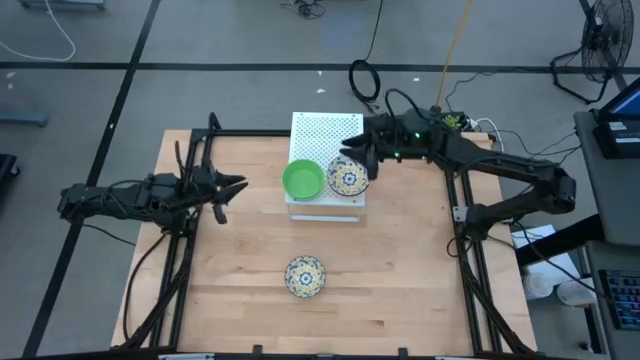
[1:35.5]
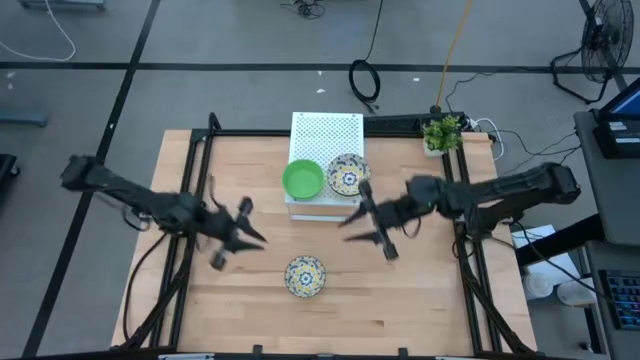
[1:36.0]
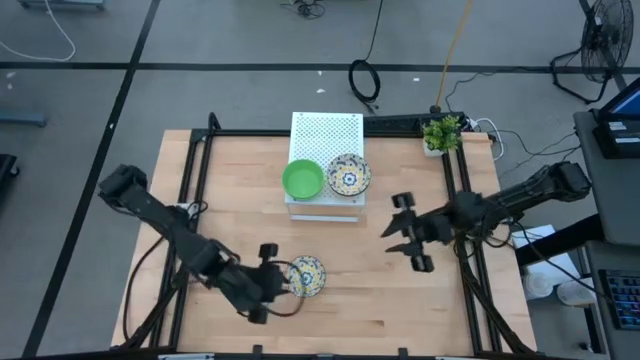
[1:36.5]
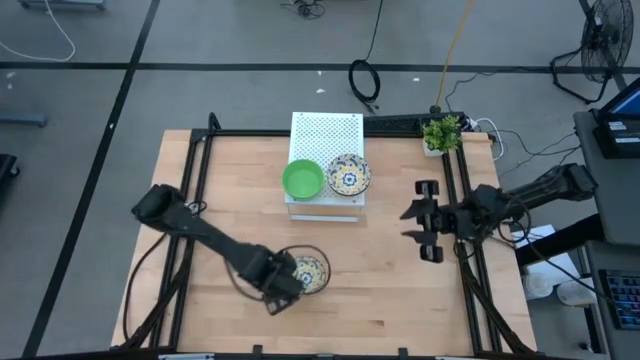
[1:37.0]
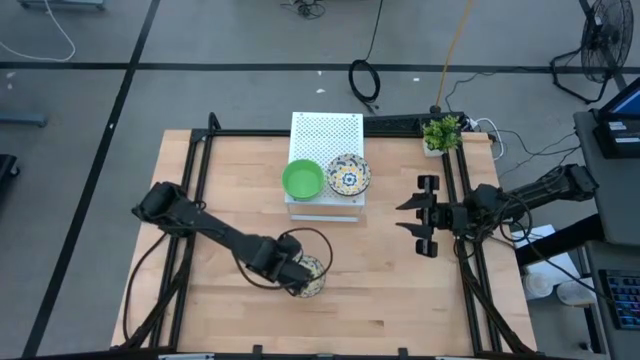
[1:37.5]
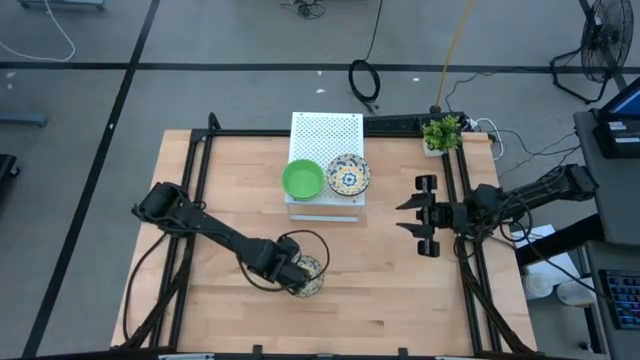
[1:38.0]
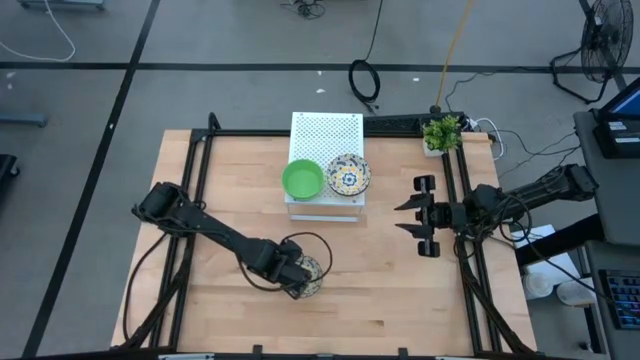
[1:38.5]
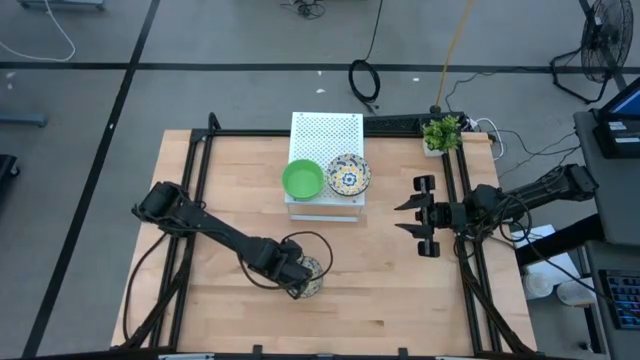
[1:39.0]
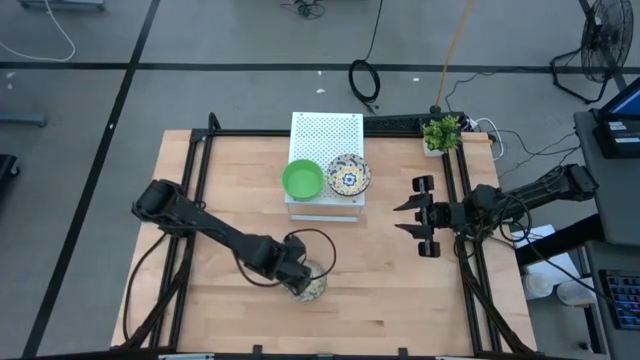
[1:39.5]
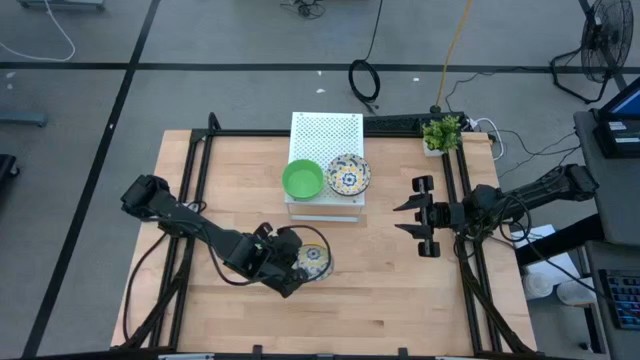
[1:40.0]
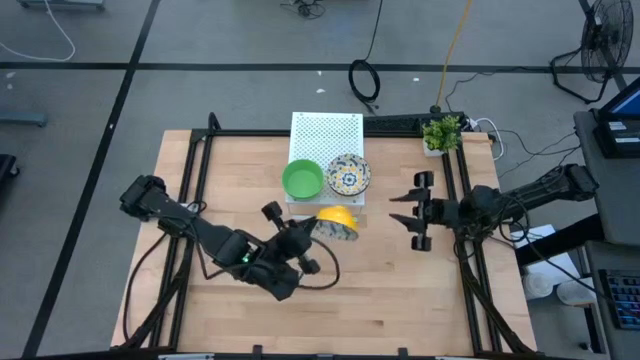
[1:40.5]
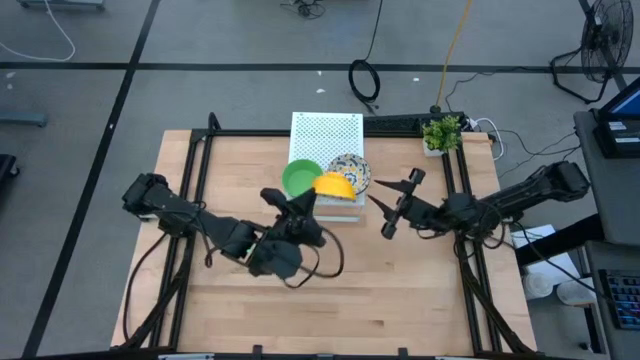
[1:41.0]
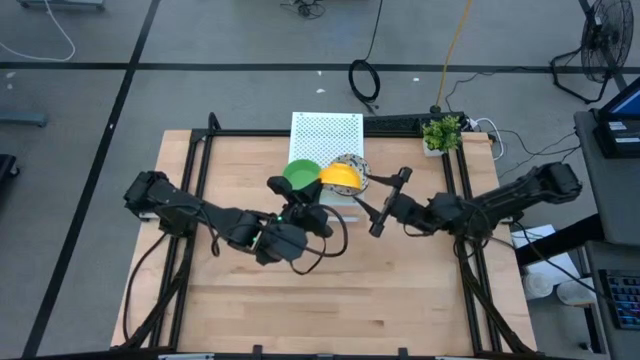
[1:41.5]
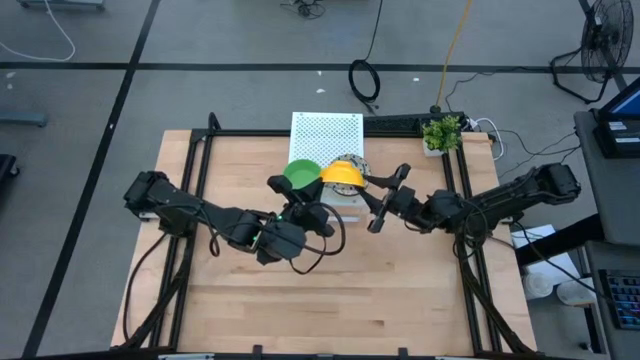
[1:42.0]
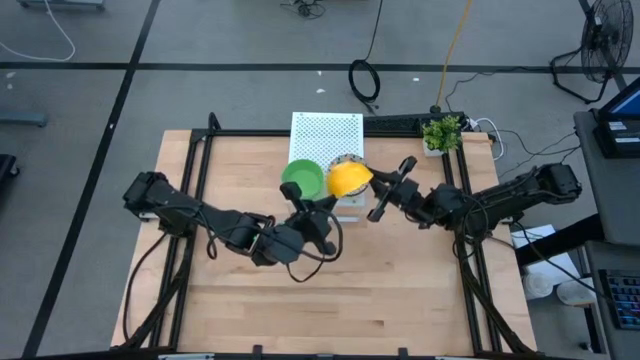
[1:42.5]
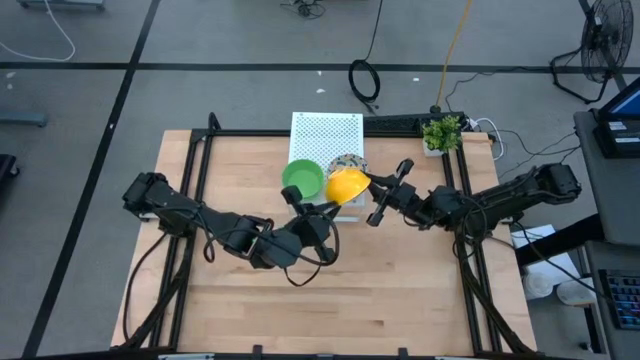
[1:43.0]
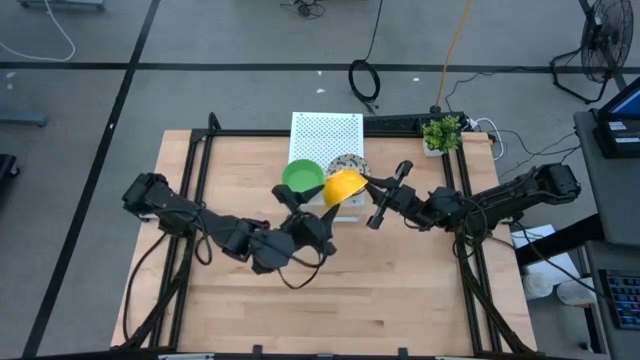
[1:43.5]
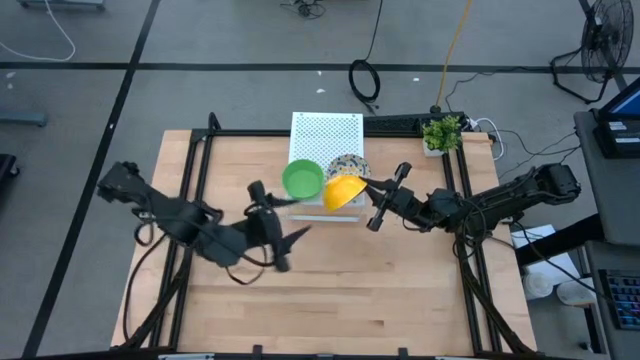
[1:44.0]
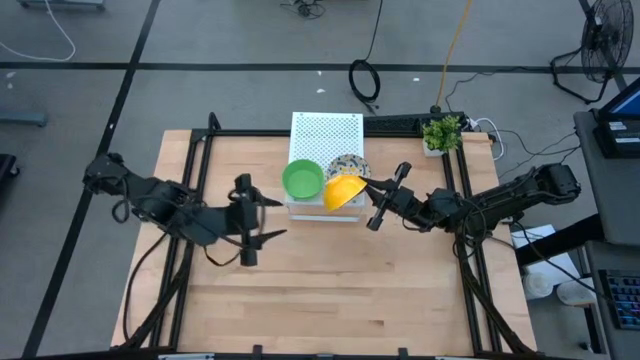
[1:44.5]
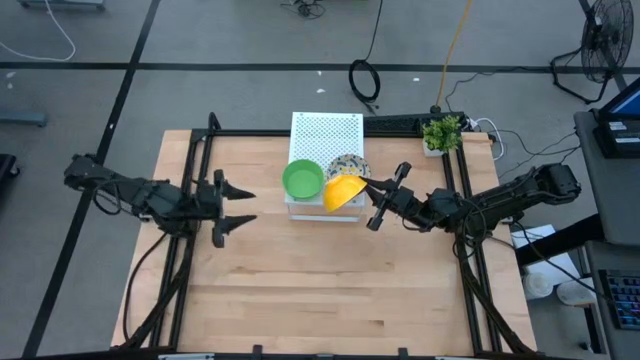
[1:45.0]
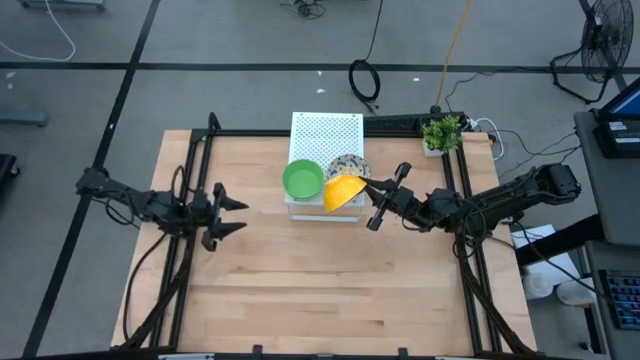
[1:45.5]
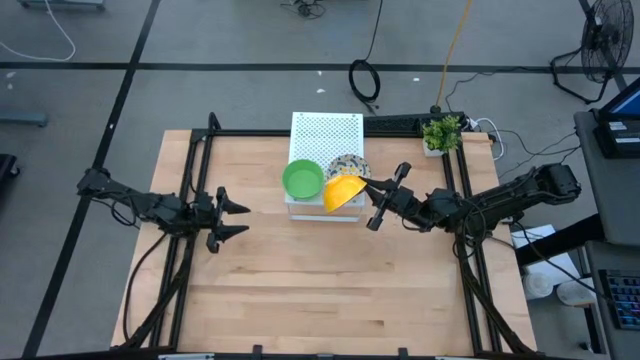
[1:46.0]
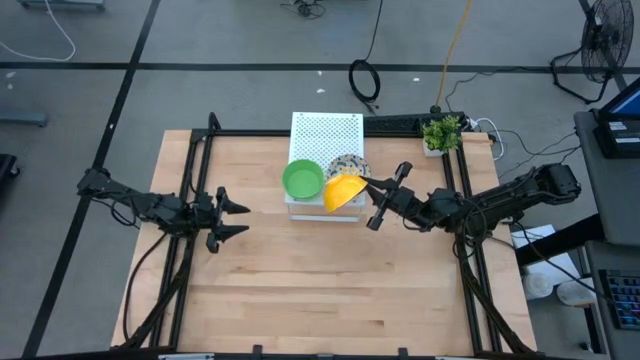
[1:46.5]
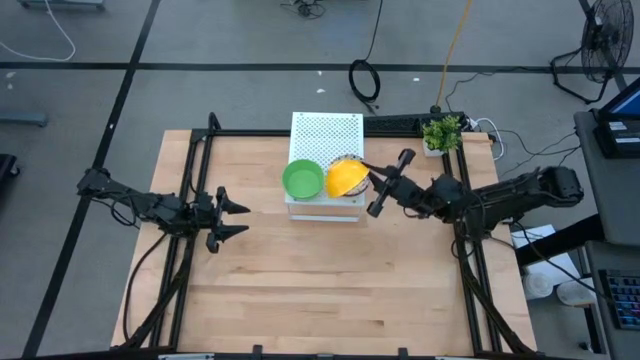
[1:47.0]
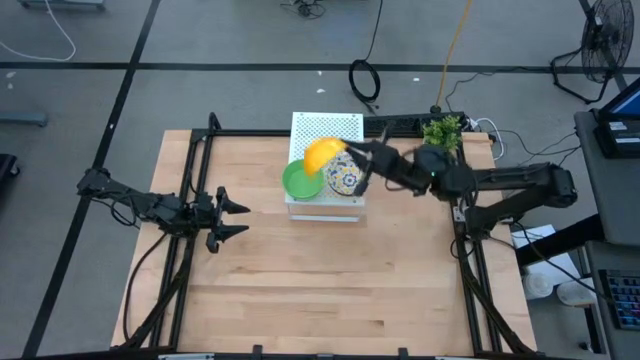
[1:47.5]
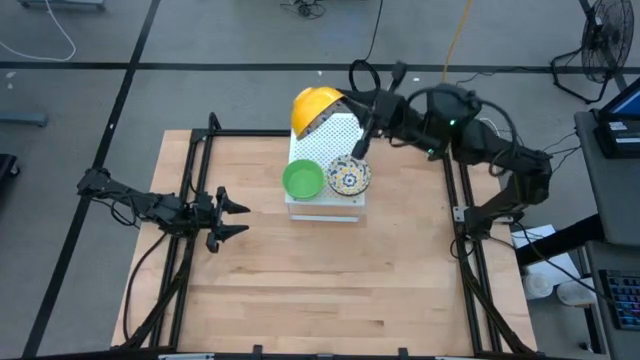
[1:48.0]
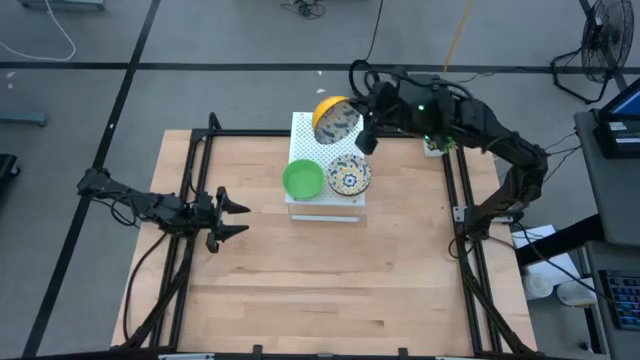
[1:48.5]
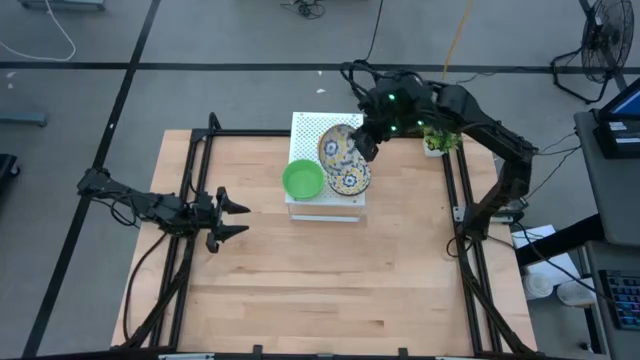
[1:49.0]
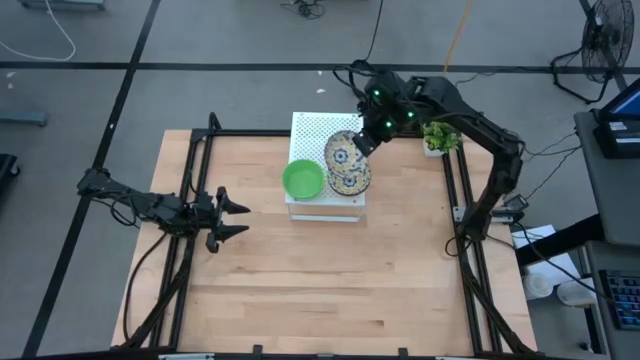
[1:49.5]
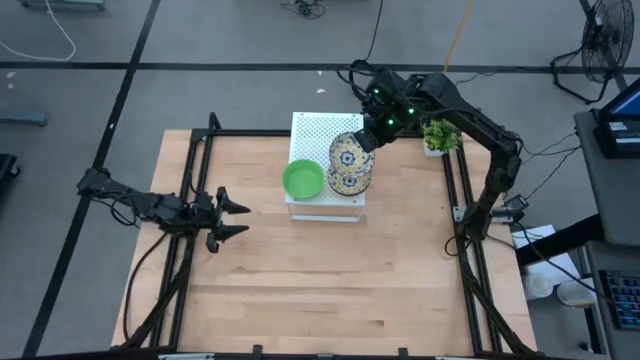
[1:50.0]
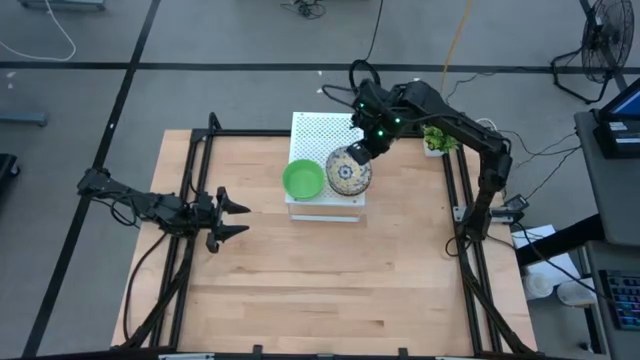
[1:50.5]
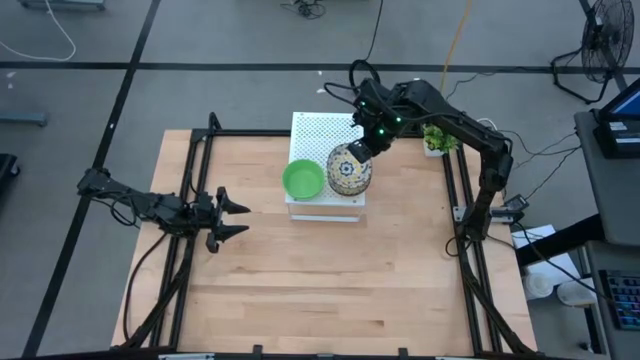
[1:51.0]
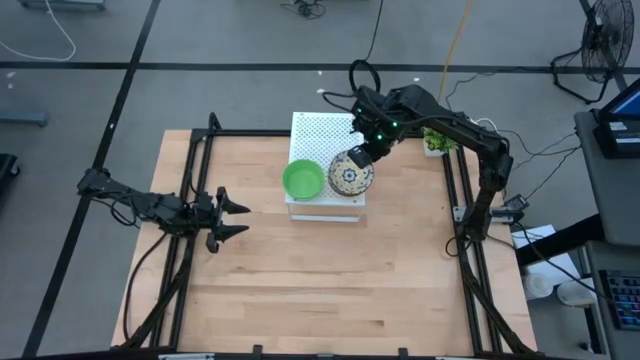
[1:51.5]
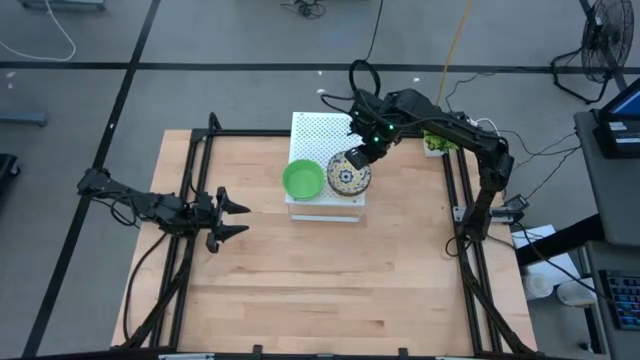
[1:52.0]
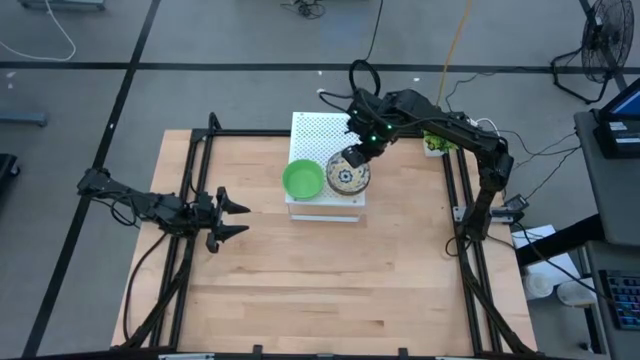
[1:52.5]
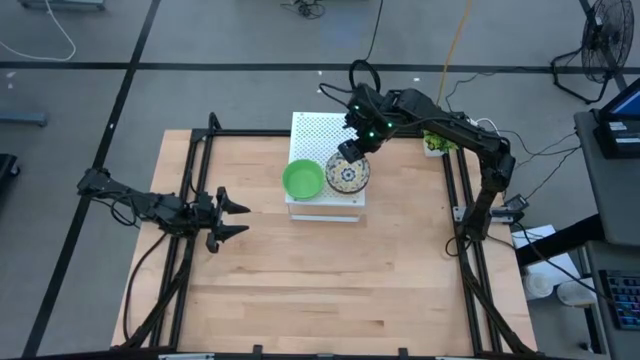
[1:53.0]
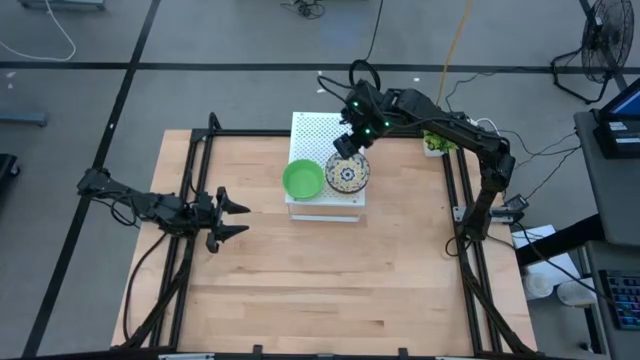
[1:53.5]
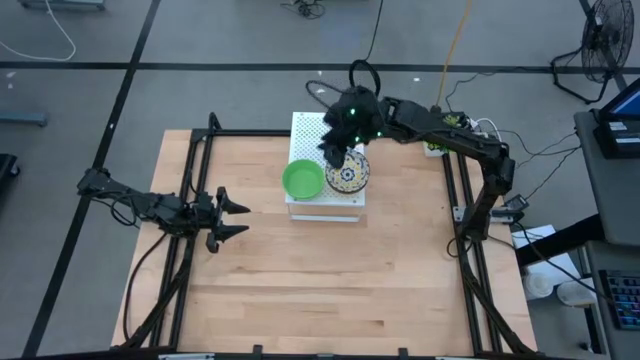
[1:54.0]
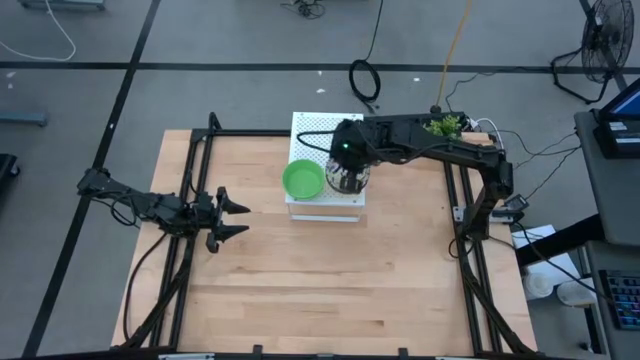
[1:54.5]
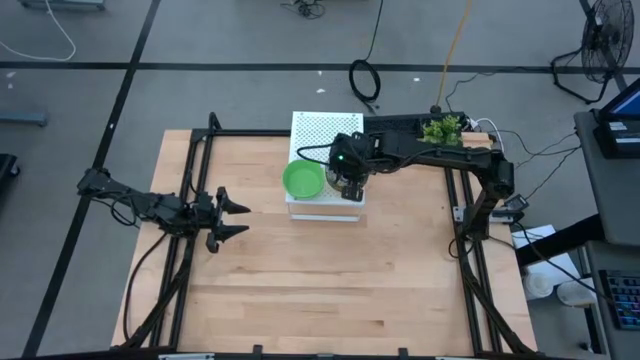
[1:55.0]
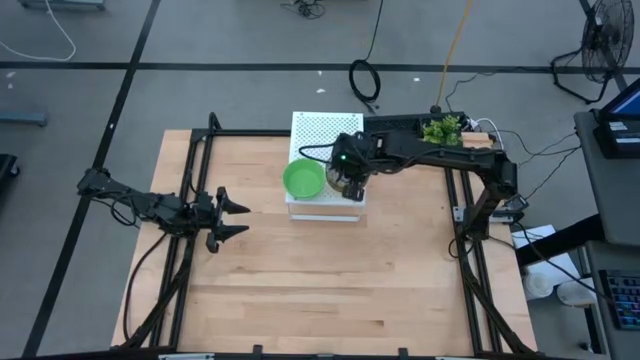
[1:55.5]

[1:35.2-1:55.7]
Task: Pick & Place Mini bowls
Stack the white bowl on the shelf

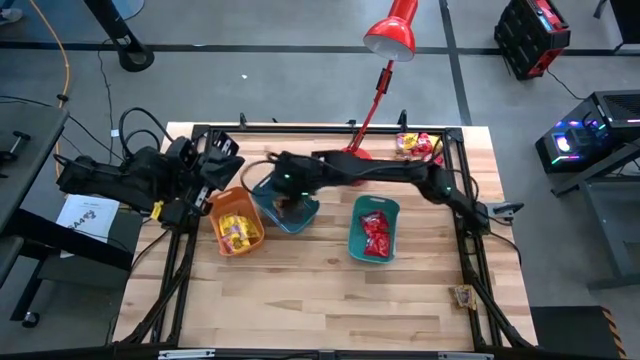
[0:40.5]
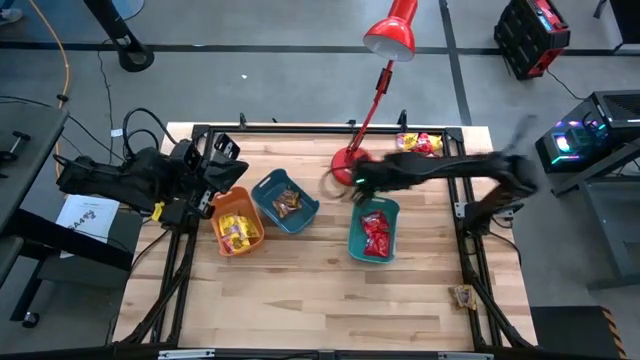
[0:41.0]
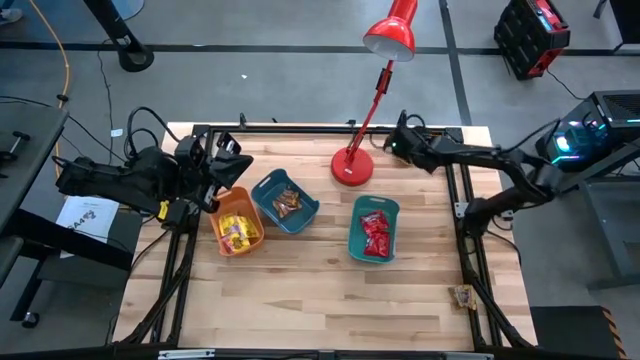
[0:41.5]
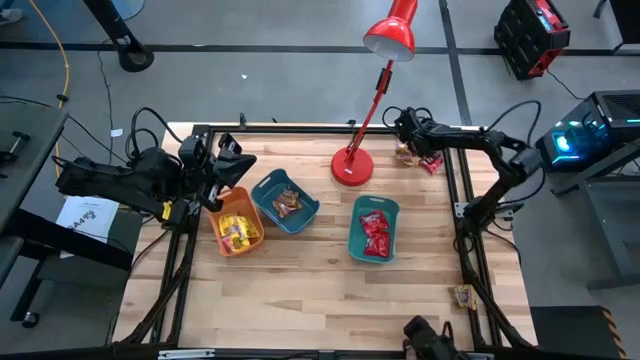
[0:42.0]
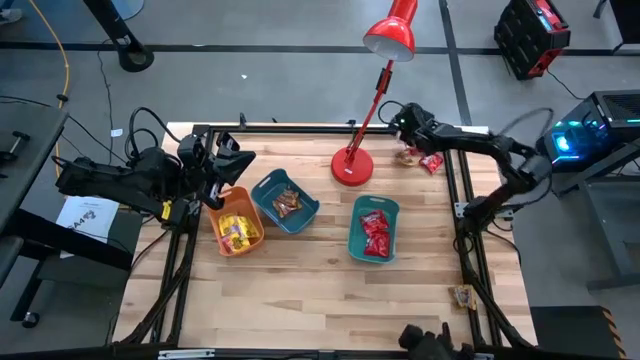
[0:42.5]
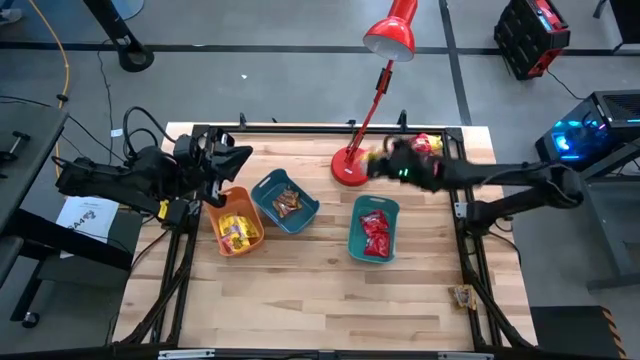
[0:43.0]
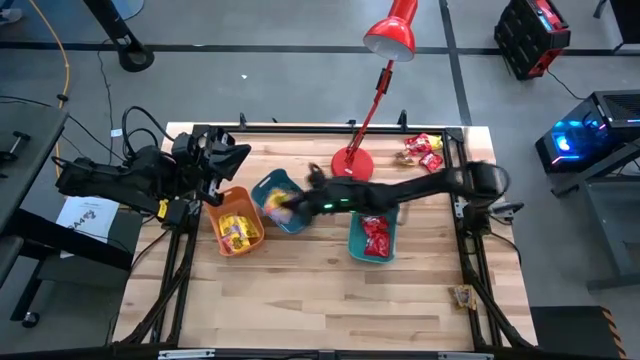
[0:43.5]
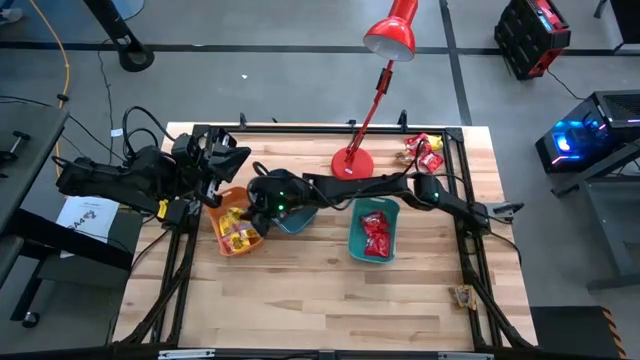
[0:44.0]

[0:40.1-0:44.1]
Task: Sort candy
Put the top right yellow candy into the orange bin
